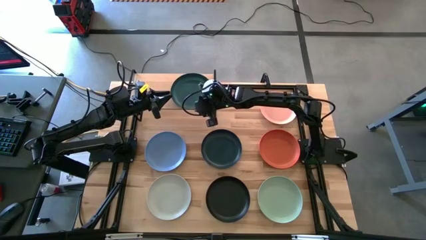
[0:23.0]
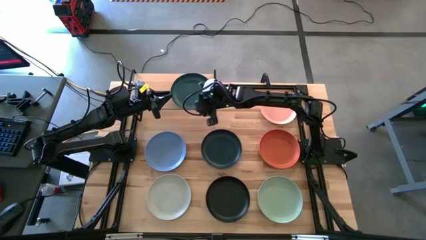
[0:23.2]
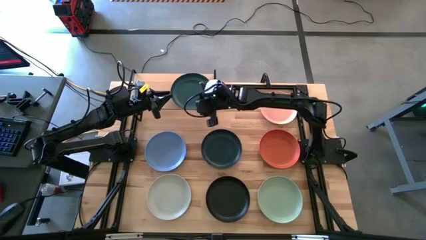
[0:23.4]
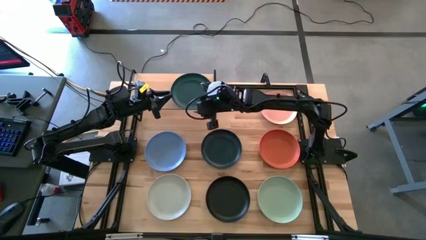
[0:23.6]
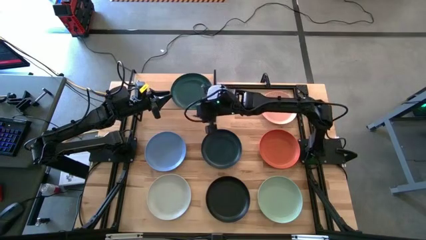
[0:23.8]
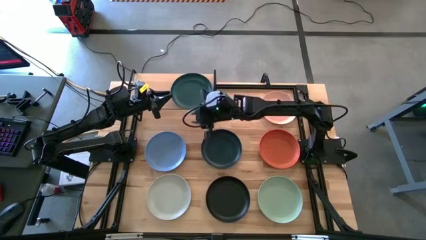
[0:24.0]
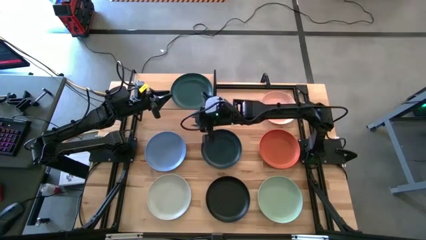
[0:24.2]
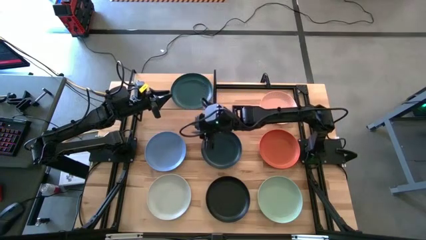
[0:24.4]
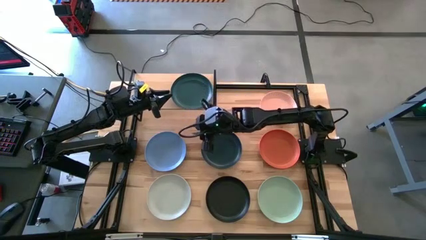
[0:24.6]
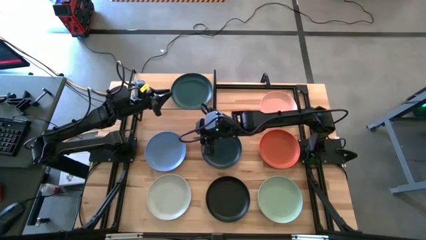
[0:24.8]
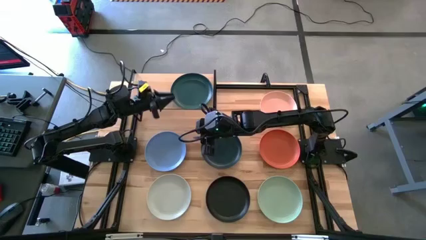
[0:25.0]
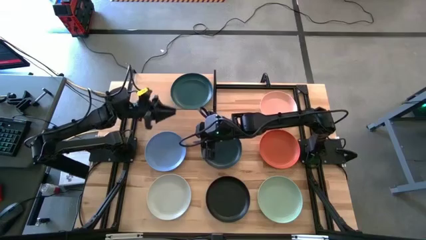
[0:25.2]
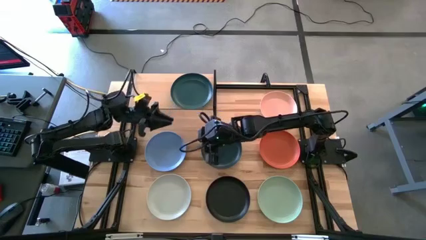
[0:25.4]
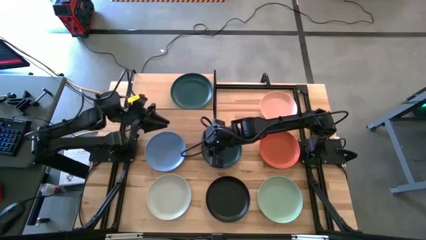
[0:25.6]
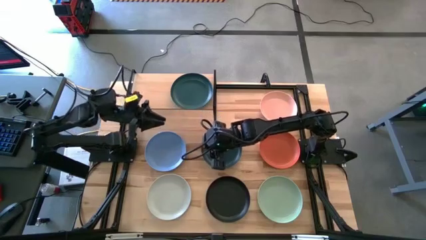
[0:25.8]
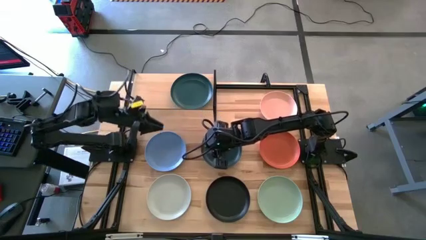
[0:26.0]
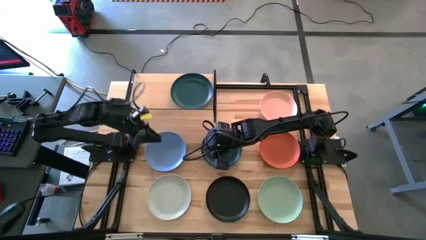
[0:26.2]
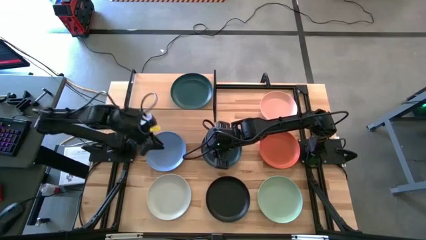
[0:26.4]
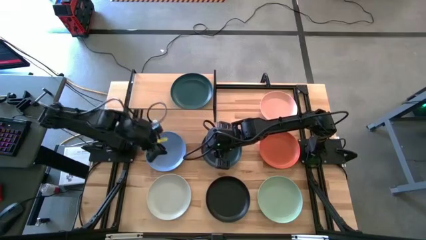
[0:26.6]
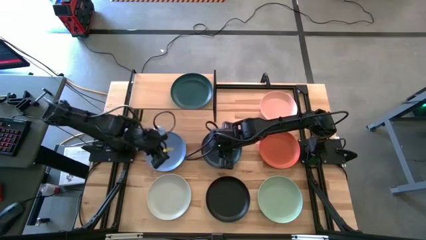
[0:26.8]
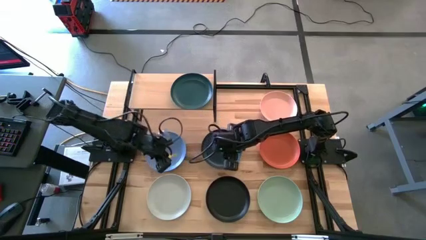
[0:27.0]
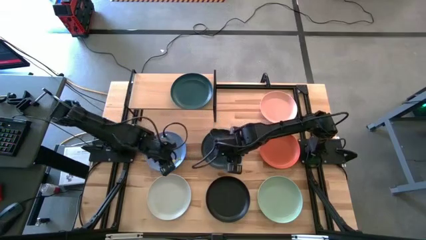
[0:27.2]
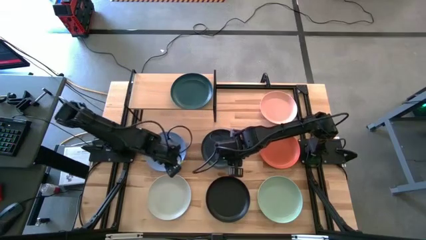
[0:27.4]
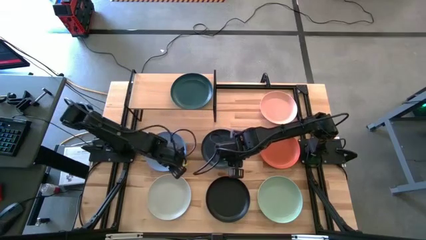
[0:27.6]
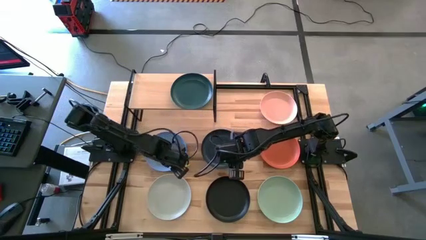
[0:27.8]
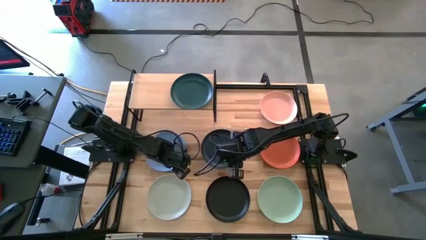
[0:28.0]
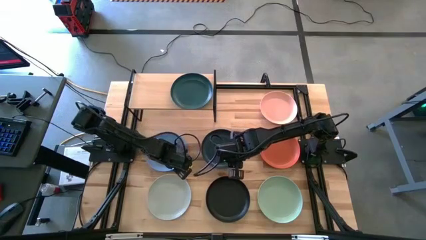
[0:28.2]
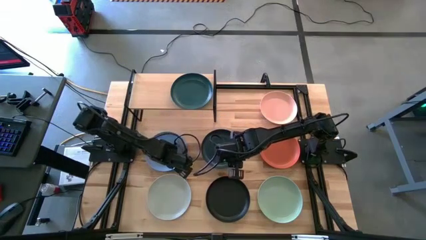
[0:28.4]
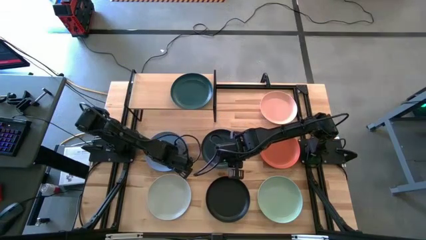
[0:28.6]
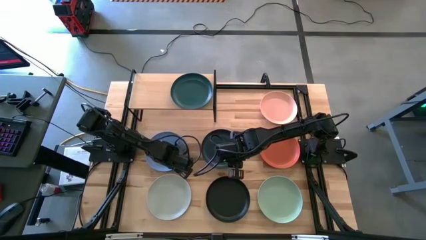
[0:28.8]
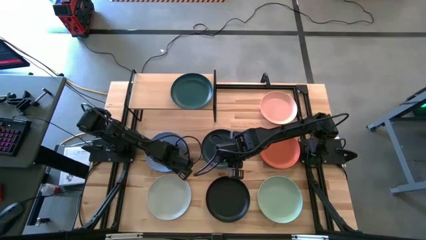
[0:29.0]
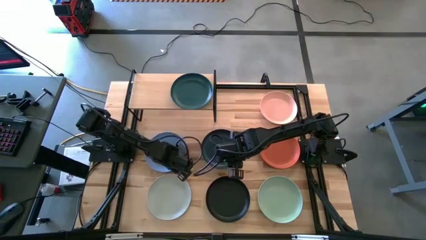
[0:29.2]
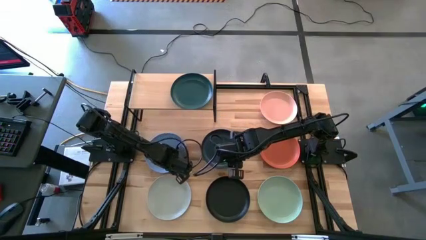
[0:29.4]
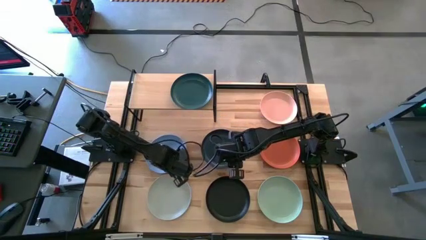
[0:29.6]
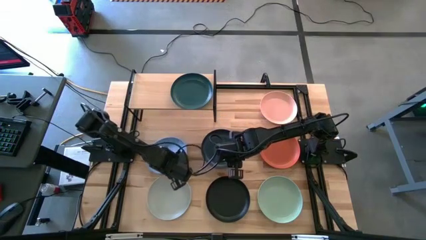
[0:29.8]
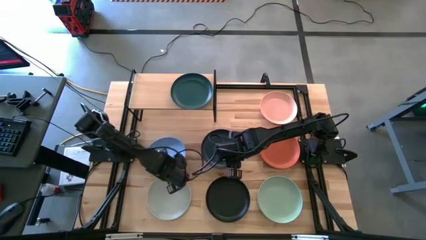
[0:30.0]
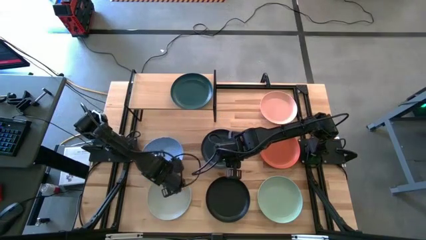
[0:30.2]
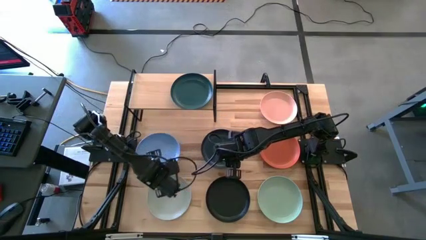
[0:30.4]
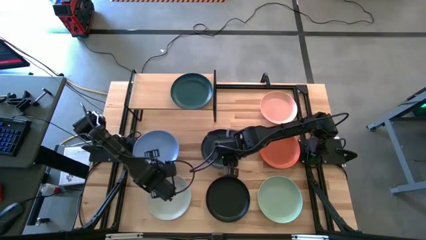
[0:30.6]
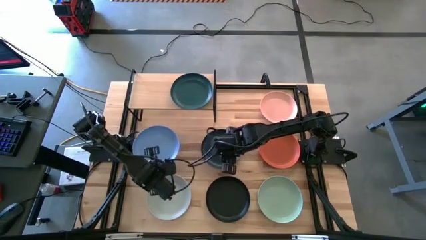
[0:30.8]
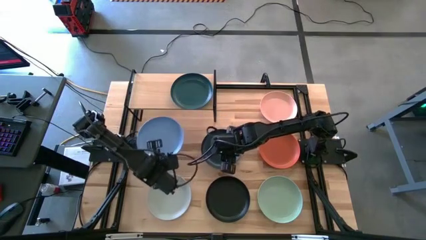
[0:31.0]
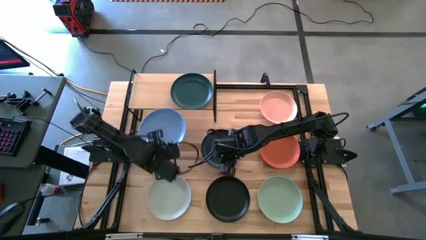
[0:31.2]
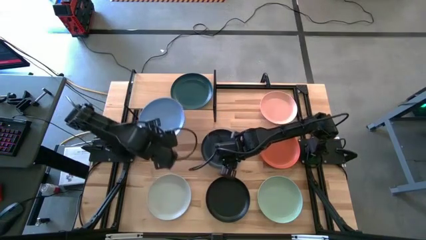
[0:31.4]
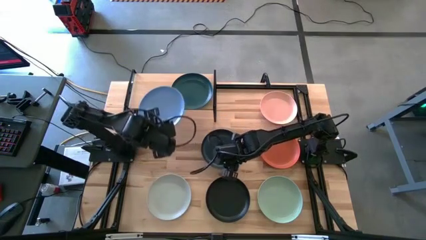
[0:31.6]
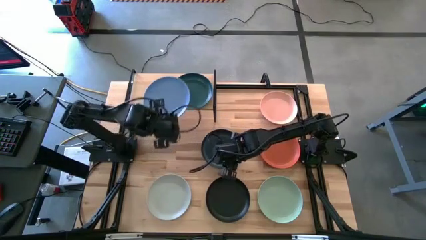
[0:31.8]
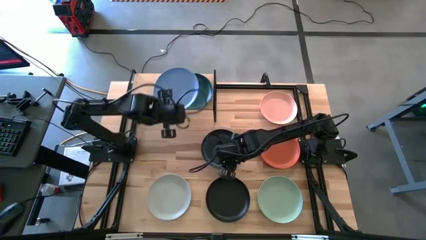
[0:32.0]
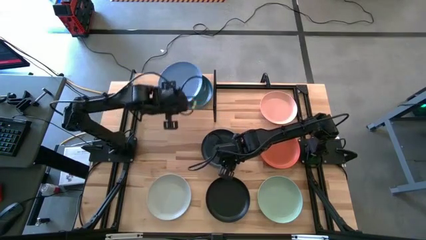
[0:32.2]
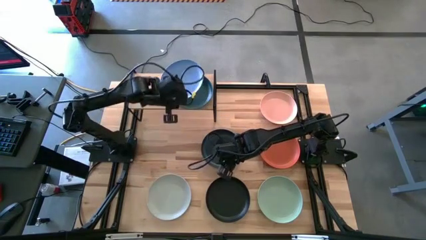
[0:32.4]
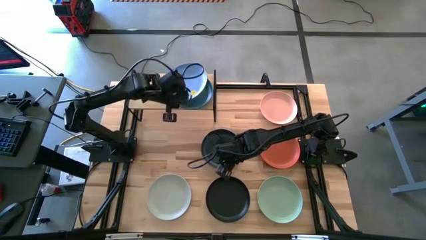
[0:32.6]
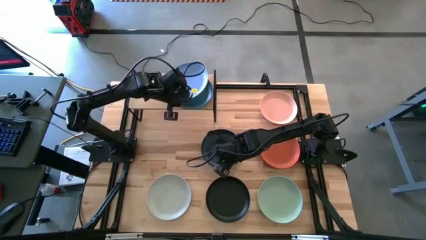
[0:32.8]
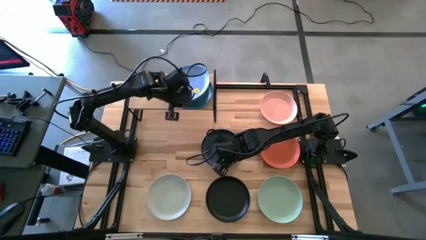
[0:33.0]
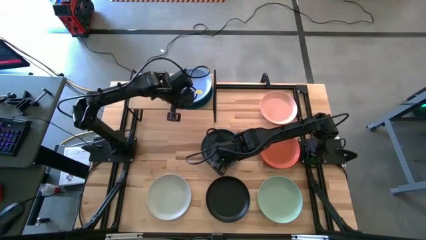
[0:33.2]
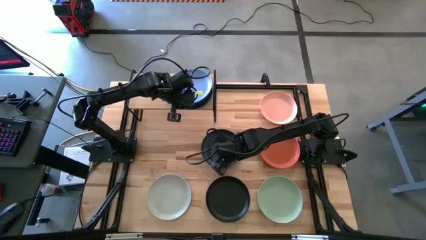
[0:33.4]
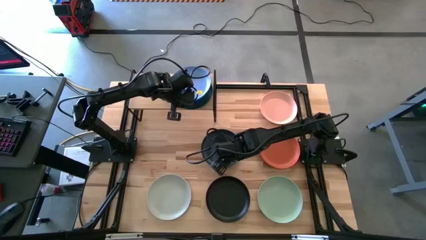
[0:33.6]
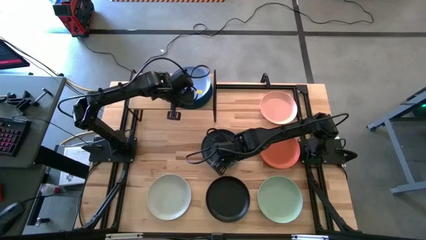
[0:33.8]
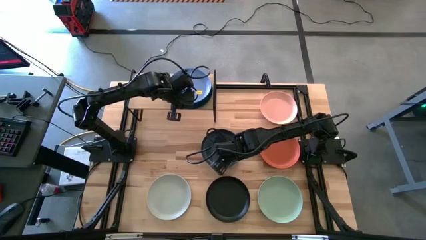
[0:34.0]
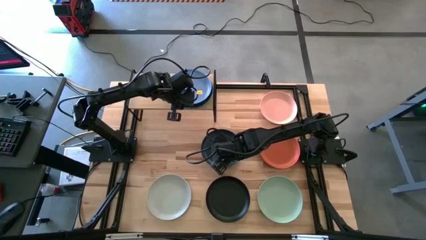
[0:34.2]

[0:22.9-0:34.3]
Task: Place and stack plates onto a shelf
Stack the light blue plate on top of the dark green plate on the shelf

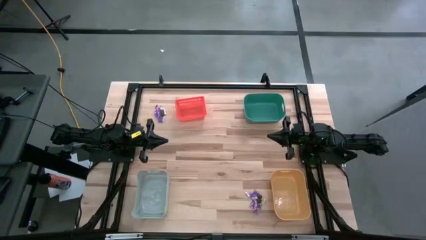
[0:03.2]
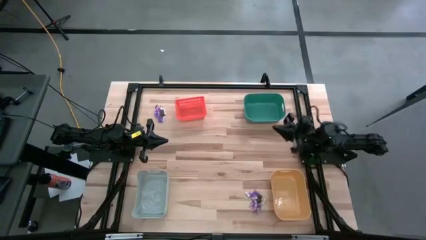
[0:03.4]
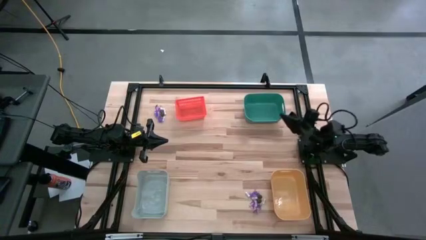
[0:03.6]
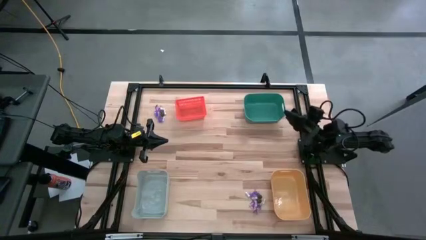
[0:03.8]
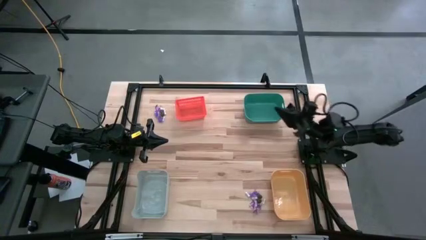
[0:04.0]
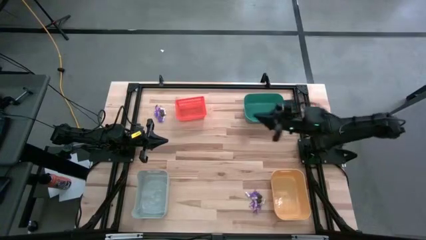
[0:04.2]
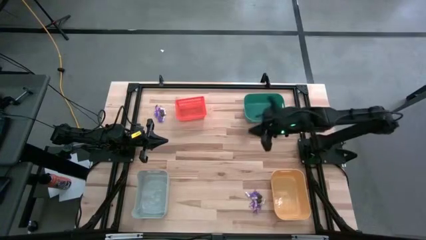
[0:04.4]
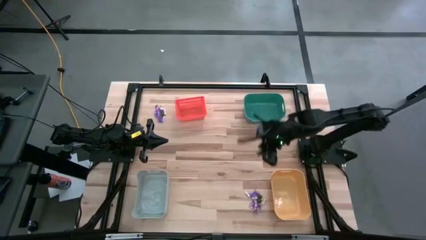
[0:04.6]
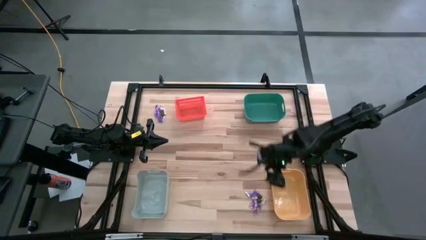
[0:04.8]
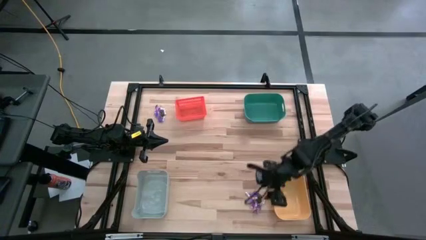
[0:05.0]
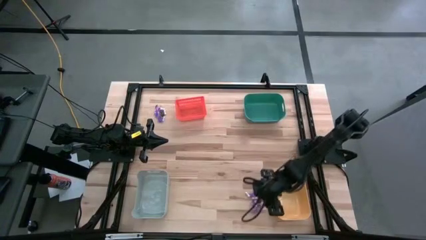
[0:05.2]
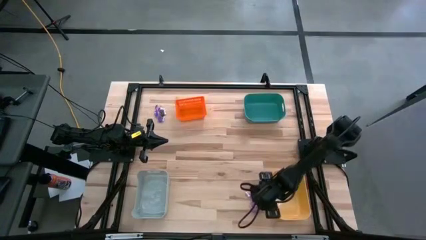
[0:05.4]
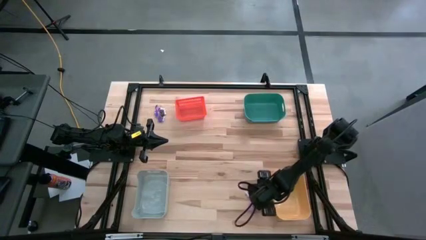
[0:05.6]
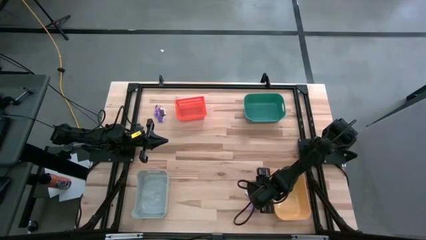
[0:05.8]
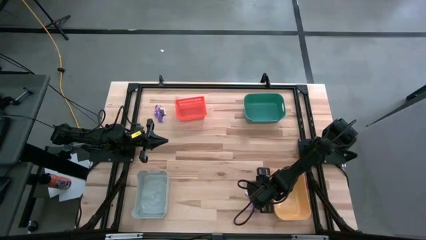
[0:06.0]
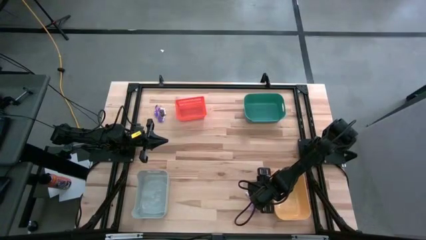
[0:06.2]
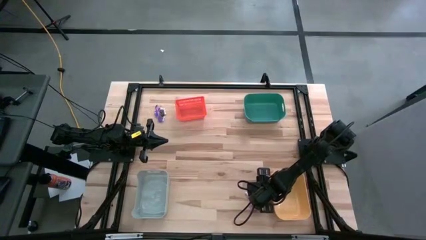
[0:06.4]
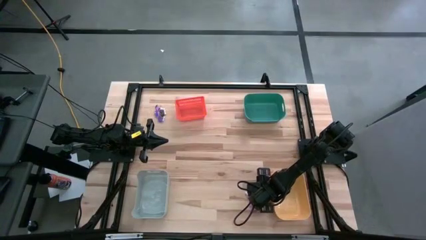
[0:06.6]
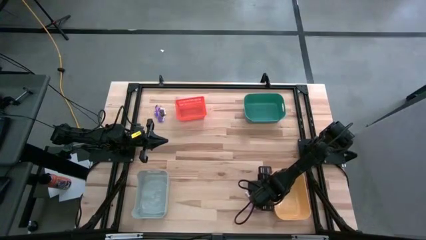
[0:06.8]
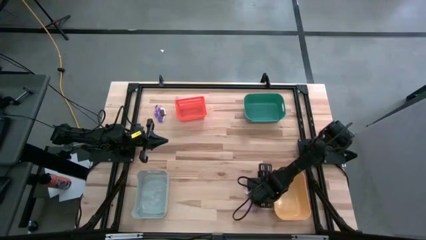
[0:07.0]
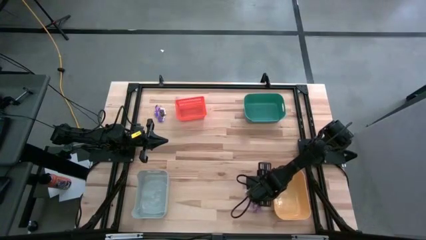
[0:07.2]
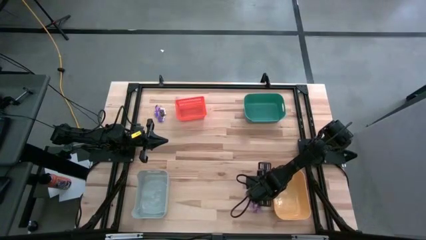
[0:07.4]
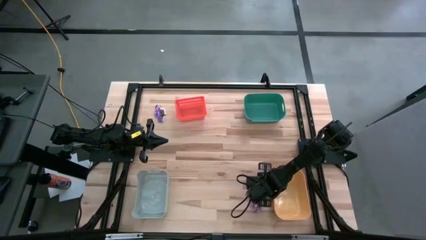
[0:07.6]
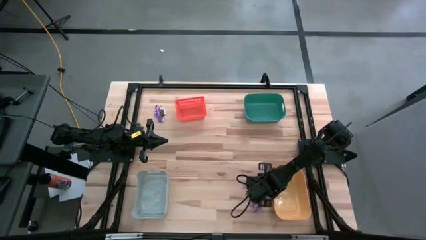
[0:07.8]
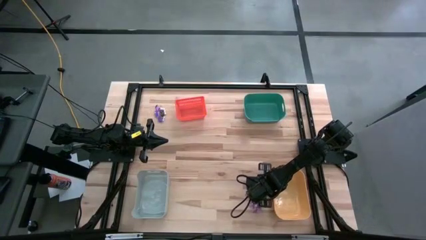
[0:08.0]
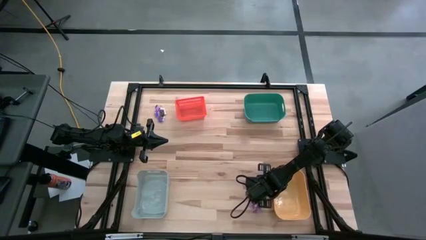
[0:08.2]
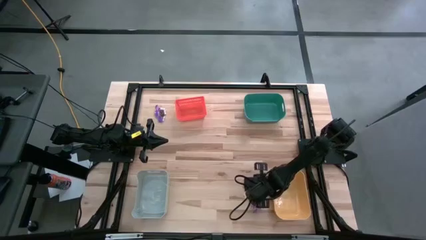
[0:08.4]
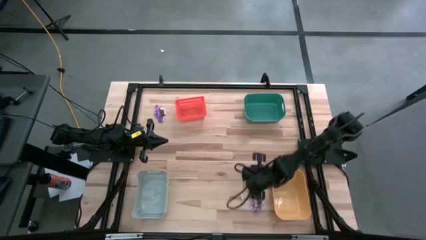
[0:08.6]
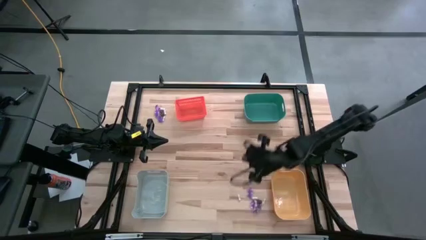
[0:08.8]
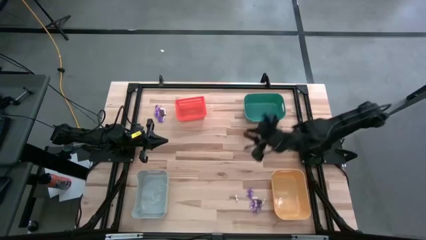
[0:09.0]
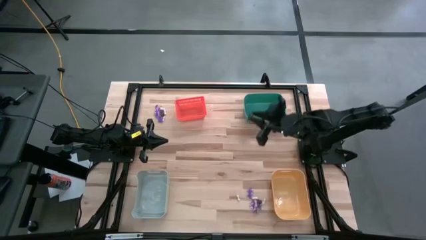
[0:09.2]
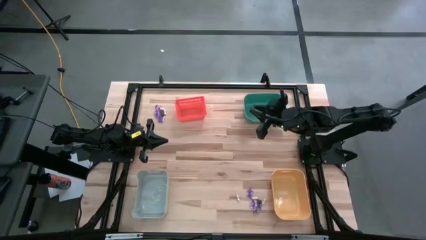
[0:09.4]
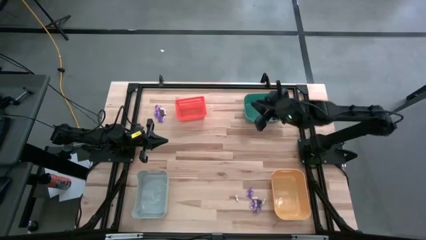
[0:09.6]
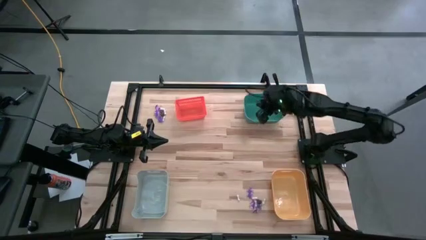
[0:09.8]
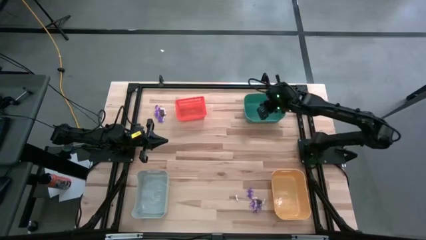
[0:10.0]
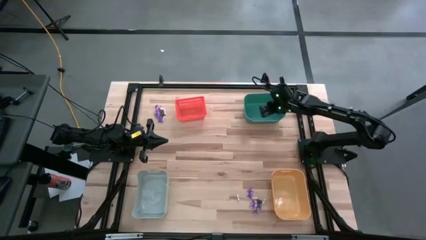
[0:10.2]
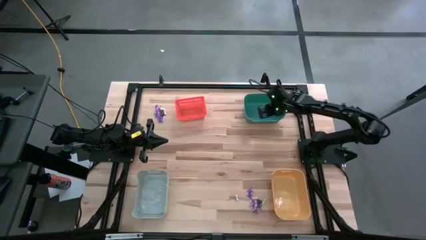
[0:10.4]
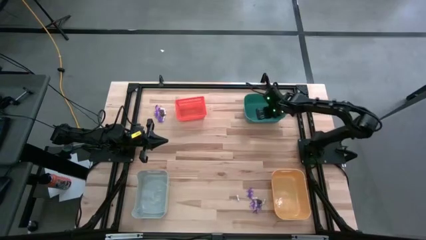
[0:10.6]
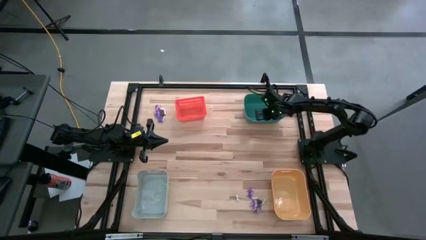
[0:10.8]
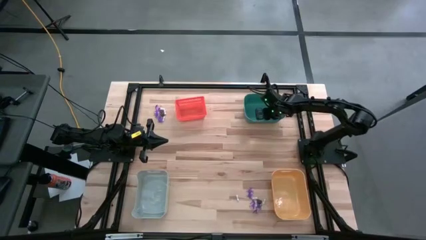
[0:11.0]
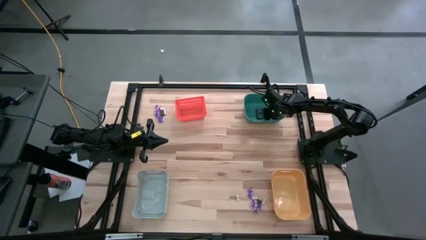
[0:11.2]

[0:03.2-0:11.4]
Task: Sort Halloween decoration
Put the black skull toy into the green bin
